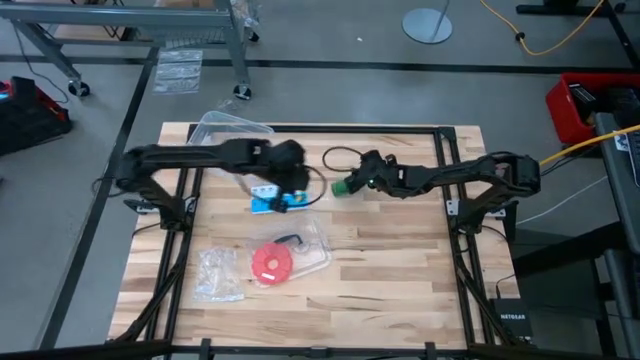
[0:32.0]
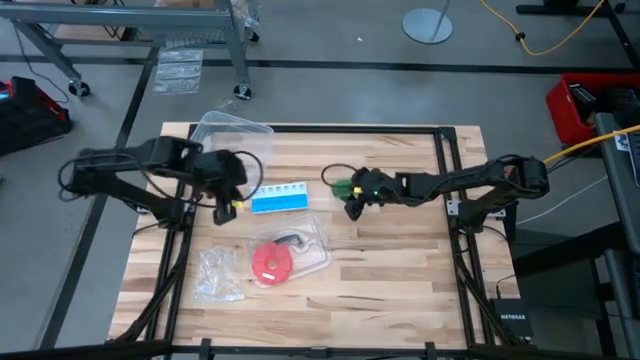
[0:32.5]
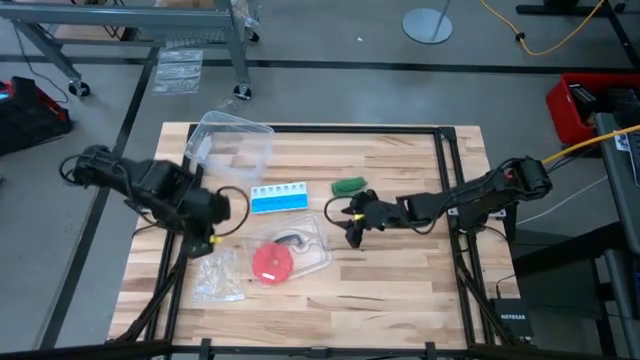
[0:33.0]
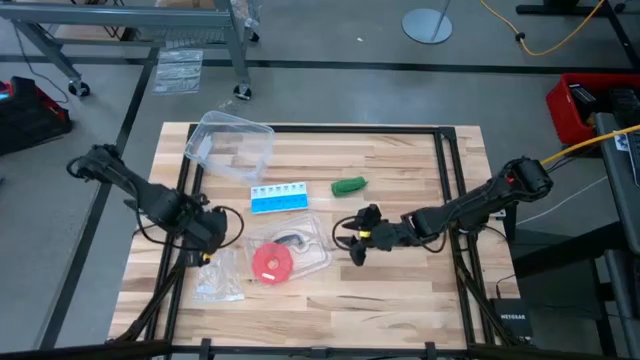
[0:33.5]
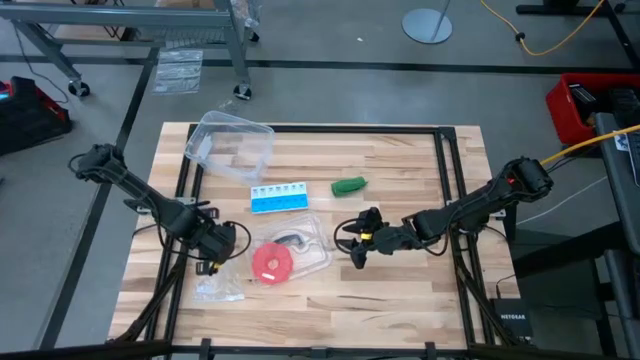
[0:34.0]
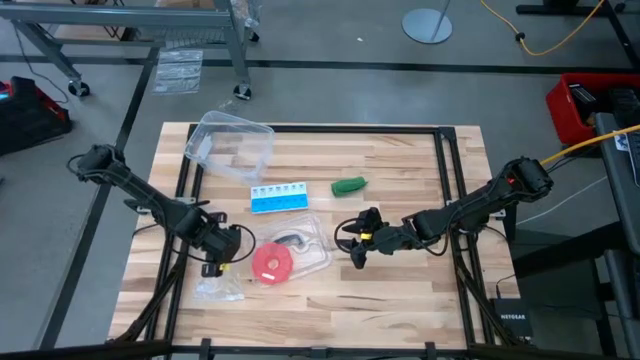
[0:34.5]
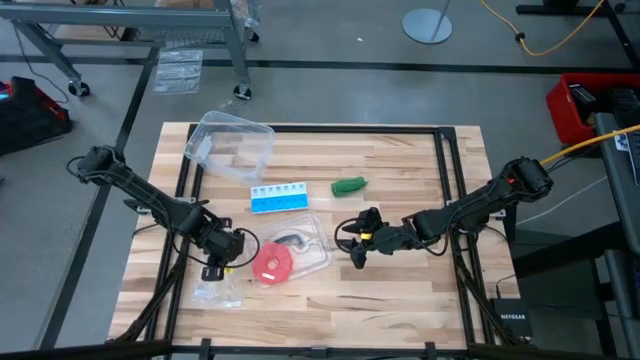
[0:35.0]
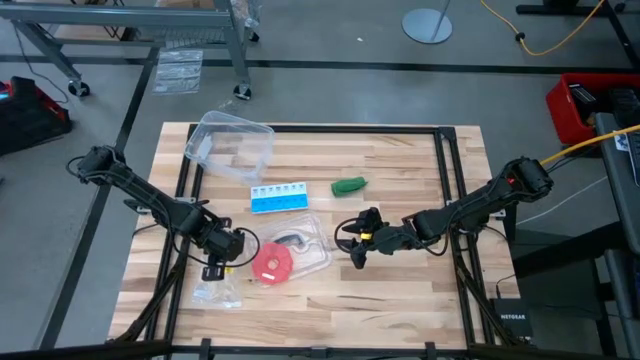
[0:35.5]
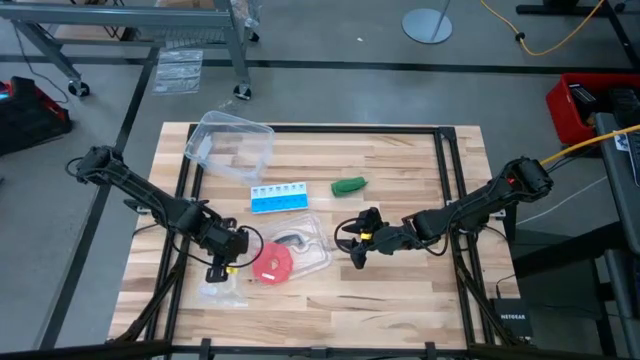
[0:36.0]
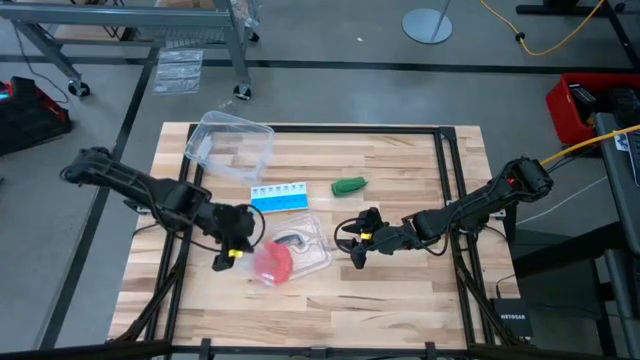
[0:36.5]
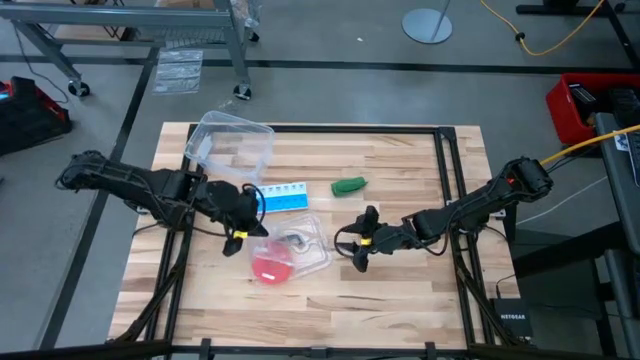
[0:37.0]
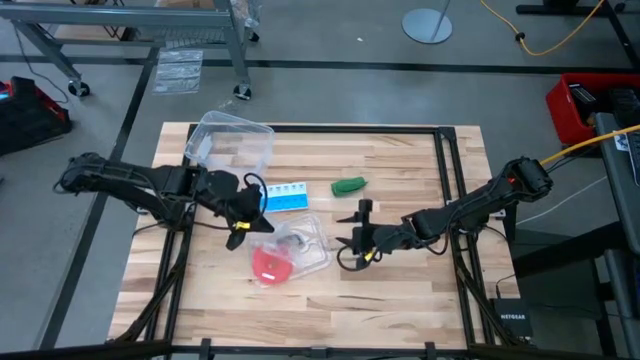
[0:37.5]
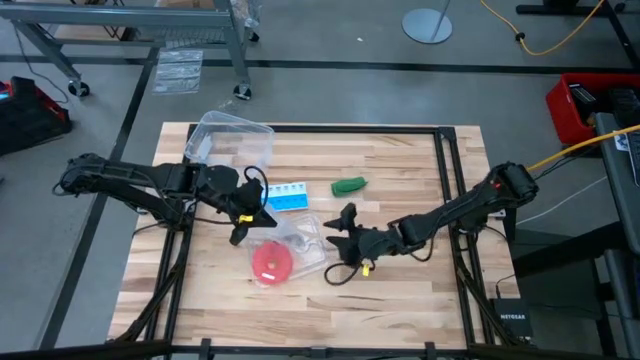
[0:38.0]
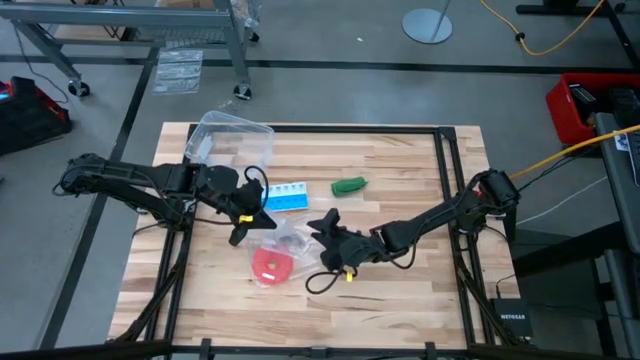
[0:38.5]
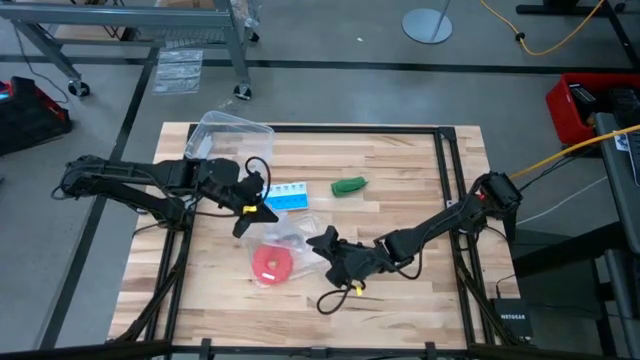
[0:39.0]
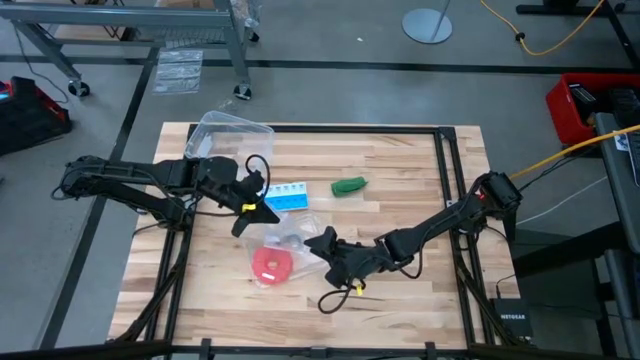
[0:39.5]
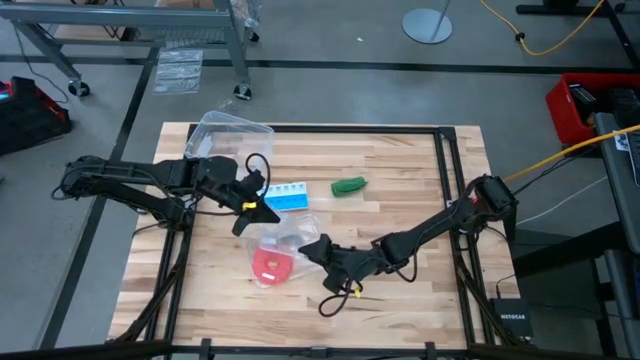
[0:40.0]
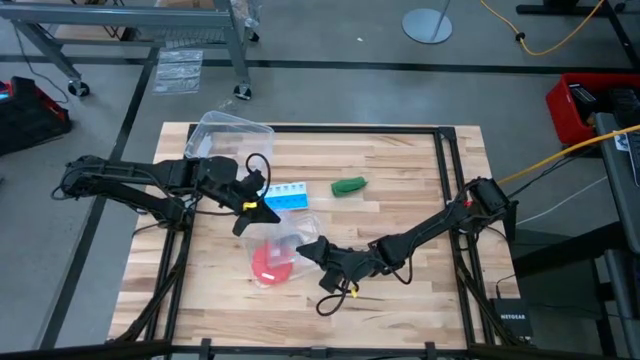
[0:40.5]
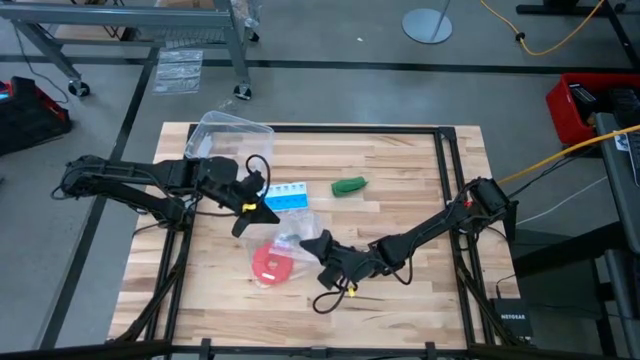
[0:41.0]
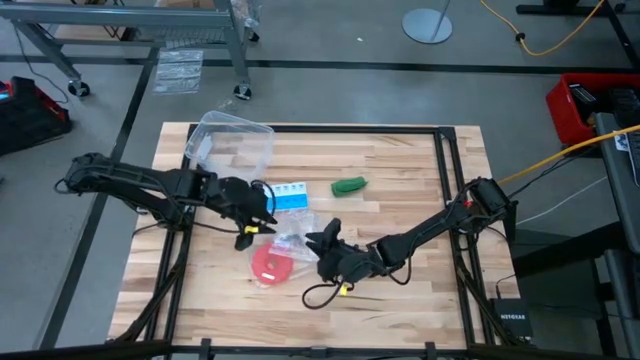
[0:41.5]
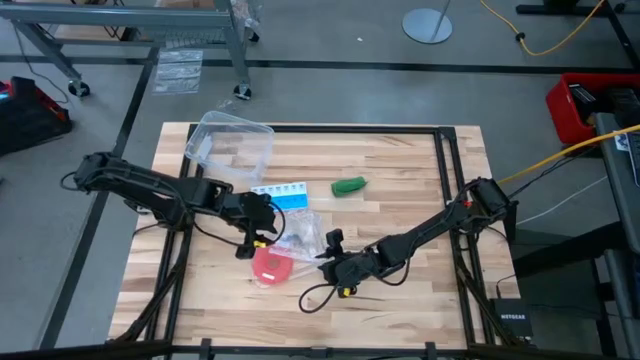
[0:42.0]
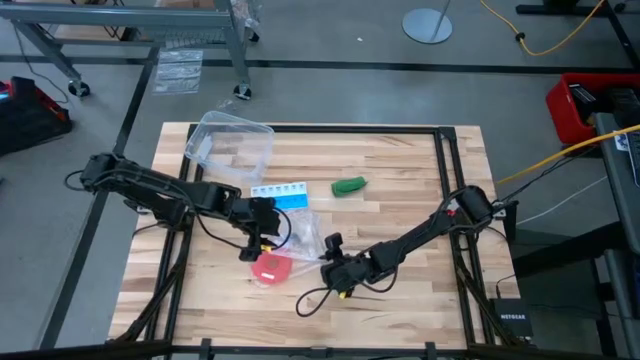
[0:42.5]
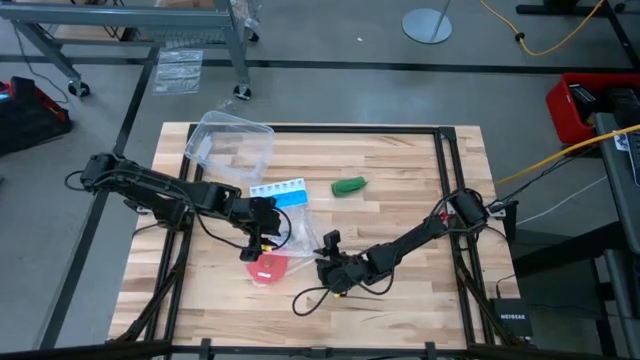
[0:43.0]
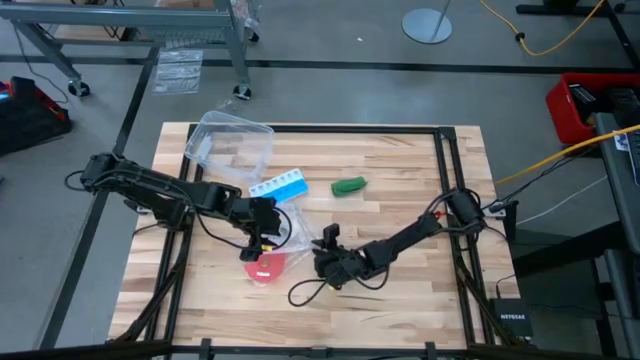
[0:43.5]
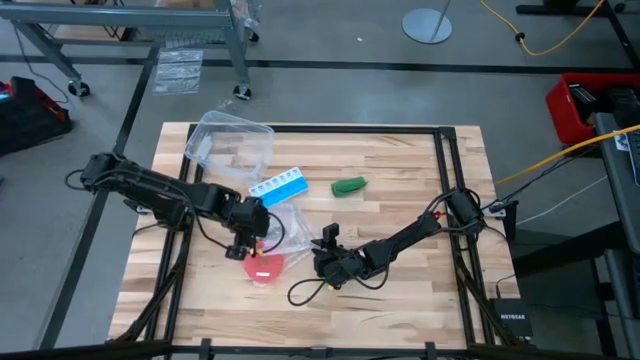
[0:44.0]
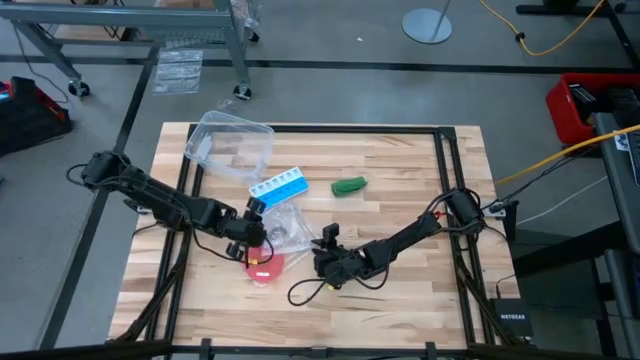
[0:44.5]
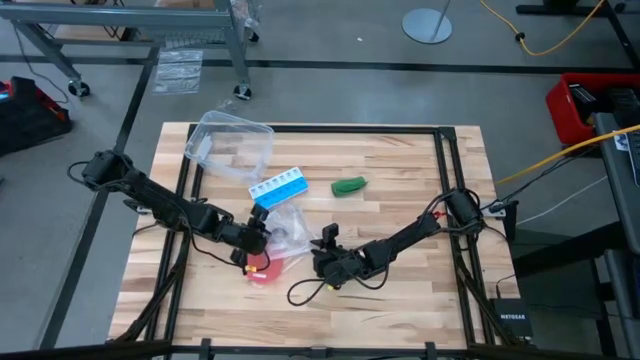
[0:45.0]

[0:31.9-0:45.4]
Task: Roll bandage
Open the transparent zip bag

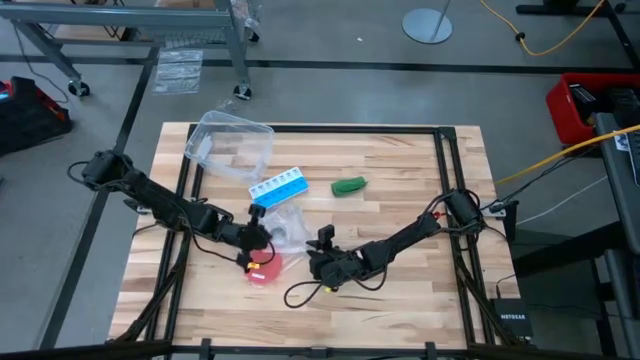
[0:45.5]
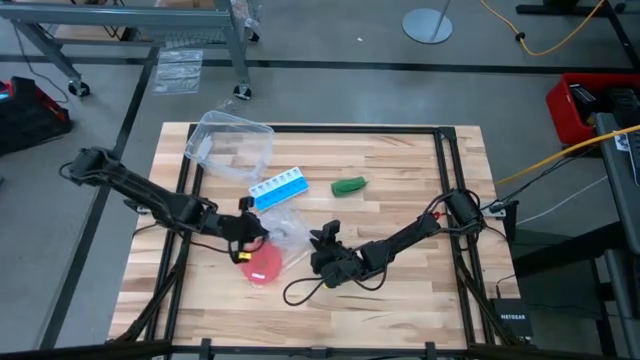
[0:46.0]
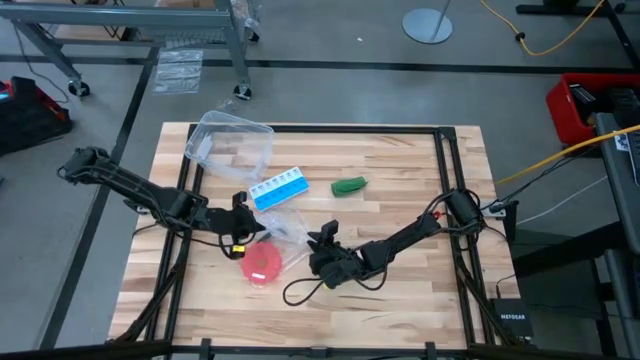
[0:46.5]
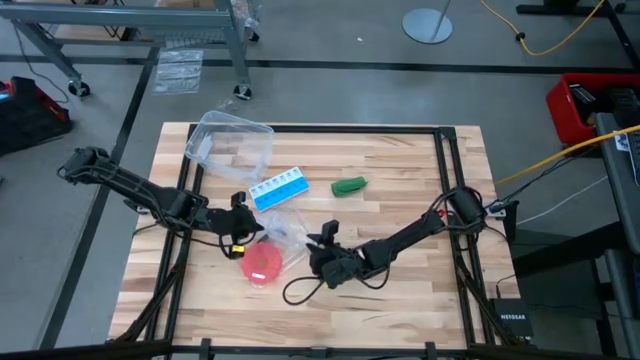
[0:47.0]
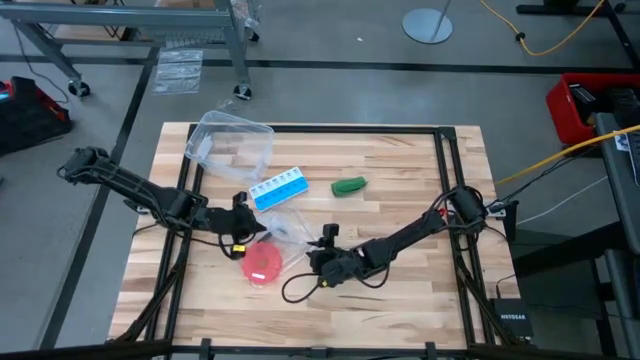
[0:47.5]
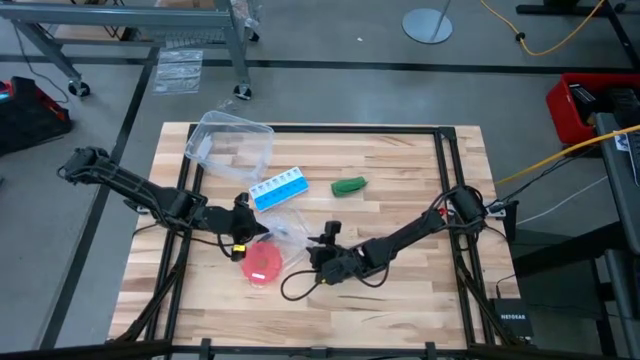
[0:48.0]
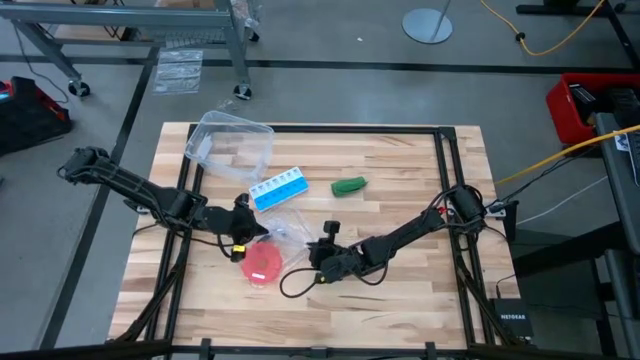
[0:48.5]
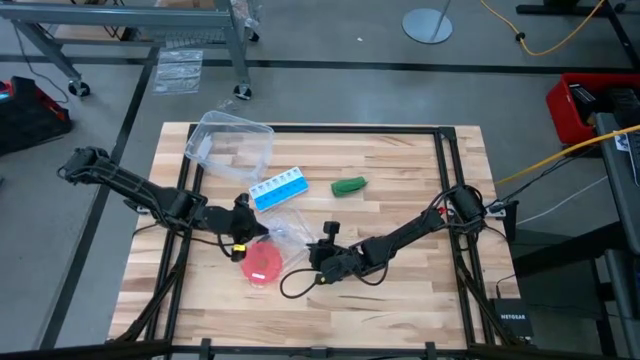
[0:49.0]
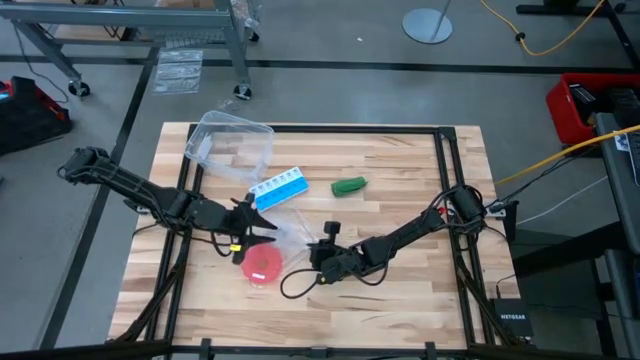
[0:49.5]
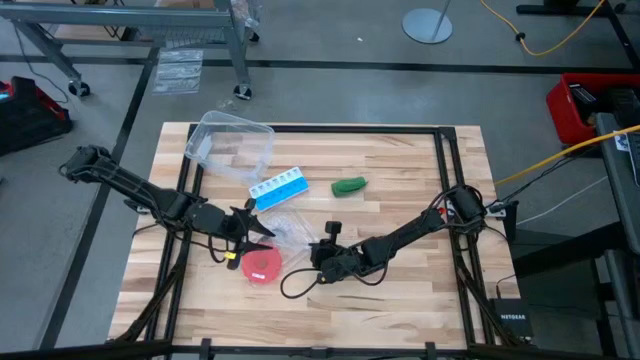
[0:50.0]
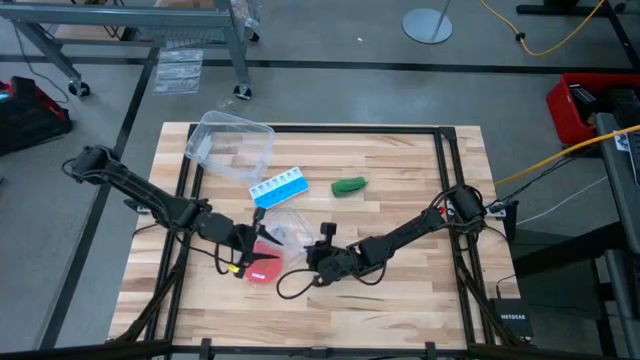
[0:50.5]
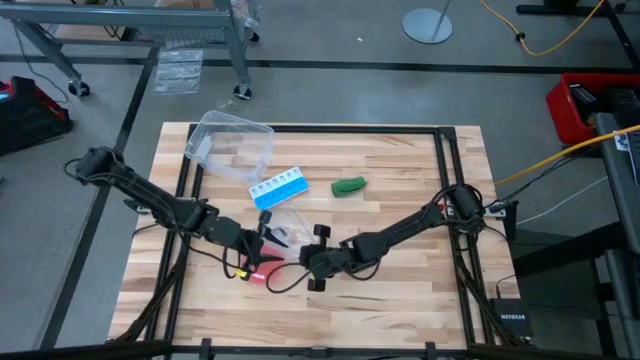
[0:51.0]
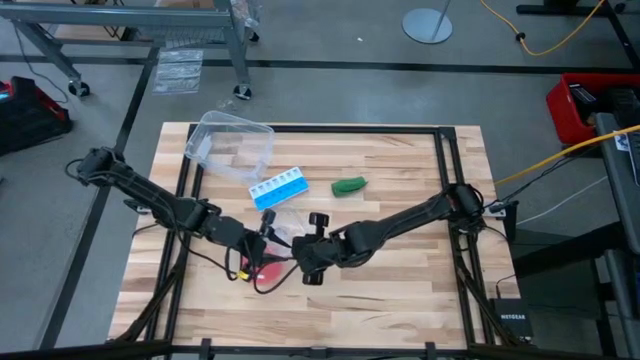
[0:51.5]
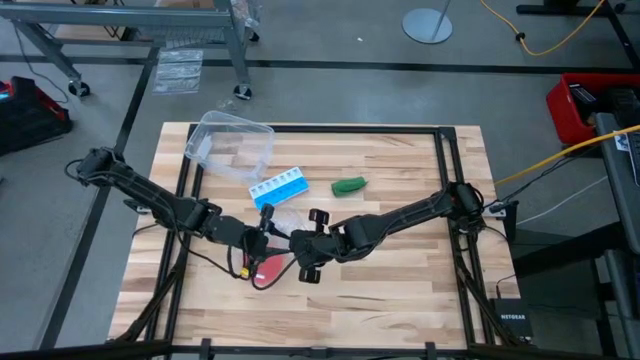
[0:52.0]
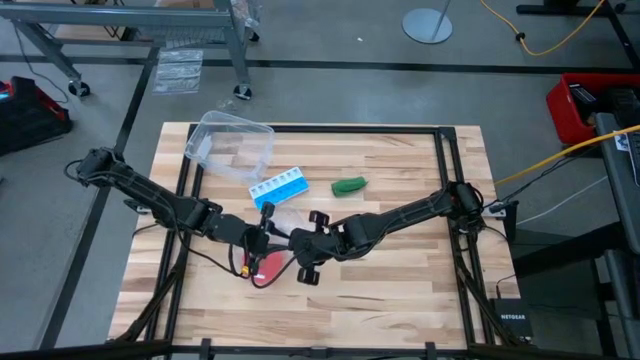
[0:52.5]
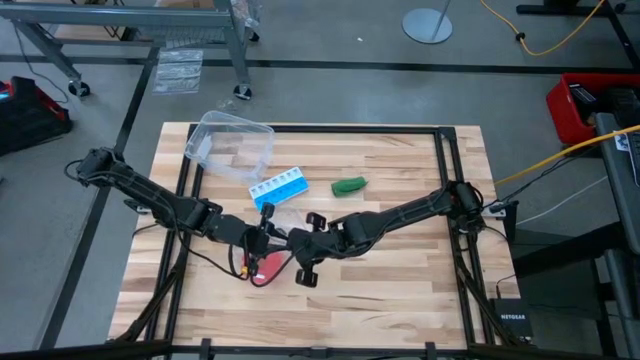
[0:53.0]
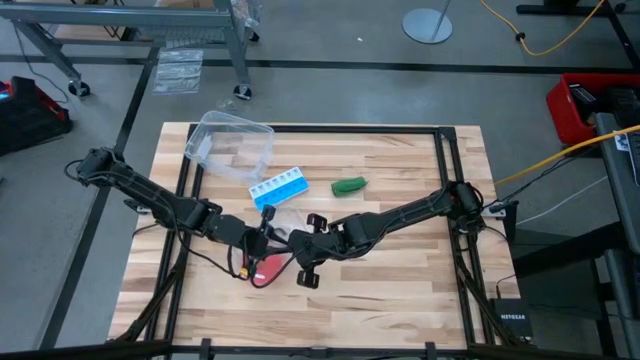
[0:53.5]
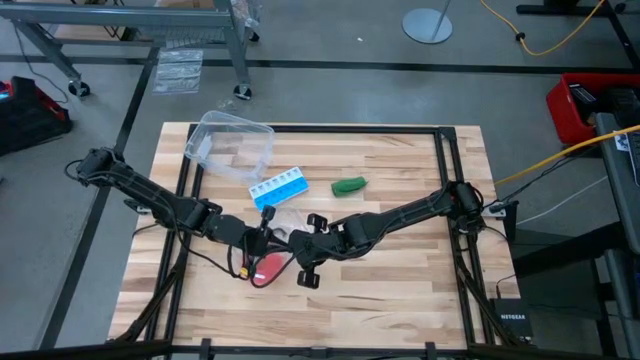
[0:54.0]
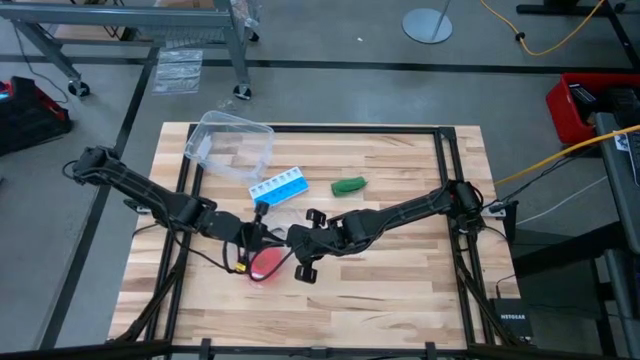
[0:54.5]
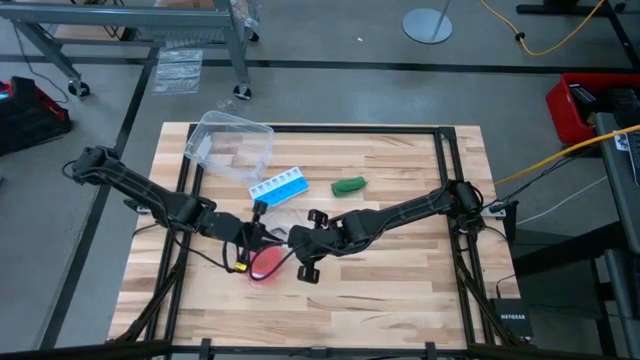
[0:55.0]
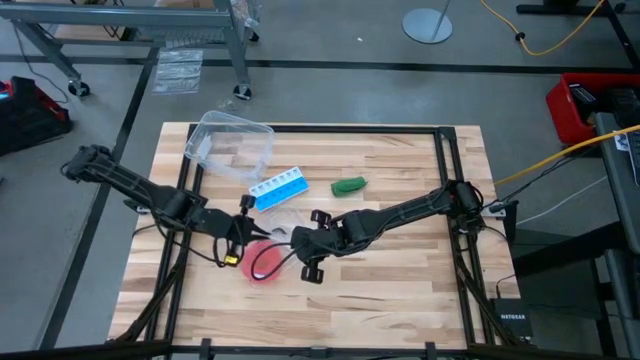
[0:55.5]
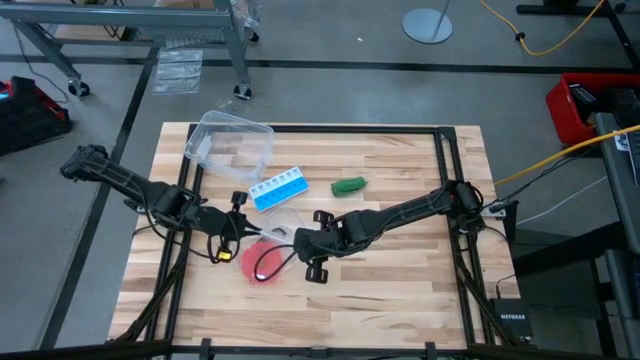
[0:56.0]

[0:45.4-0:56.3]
Open the transparent zip bag
